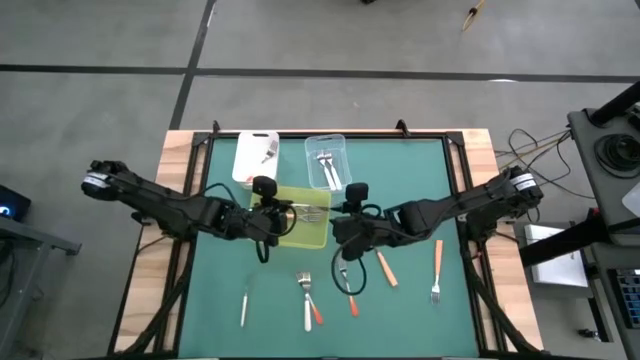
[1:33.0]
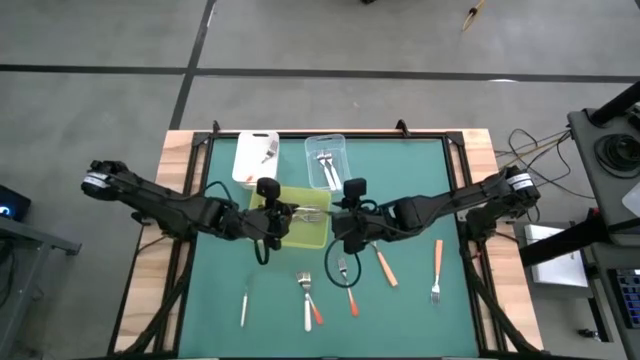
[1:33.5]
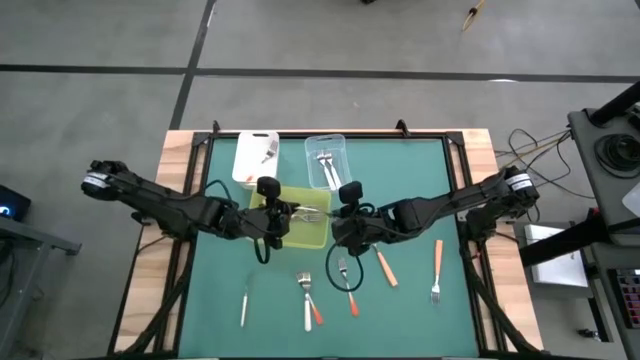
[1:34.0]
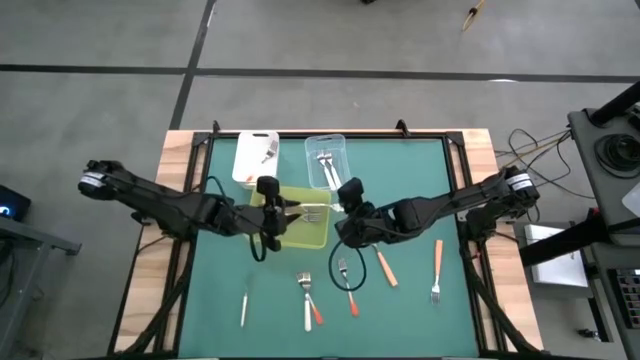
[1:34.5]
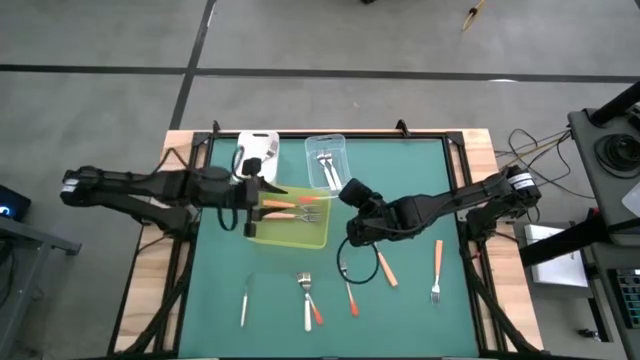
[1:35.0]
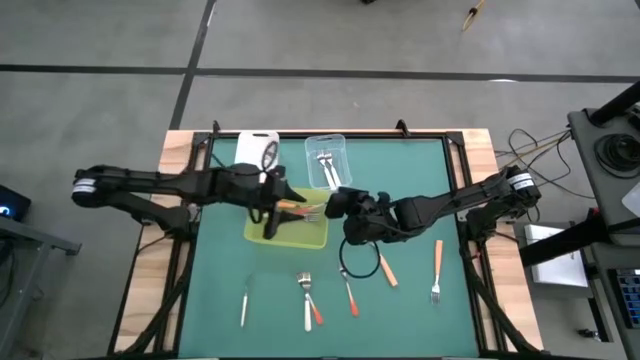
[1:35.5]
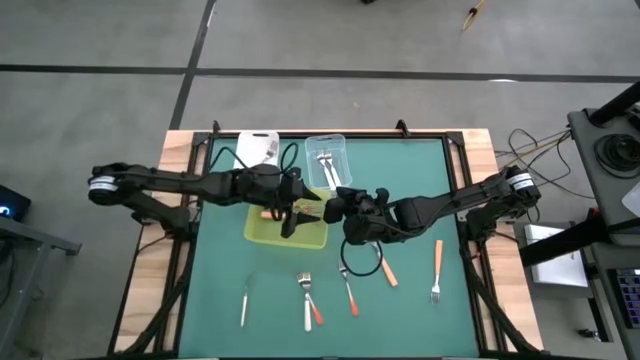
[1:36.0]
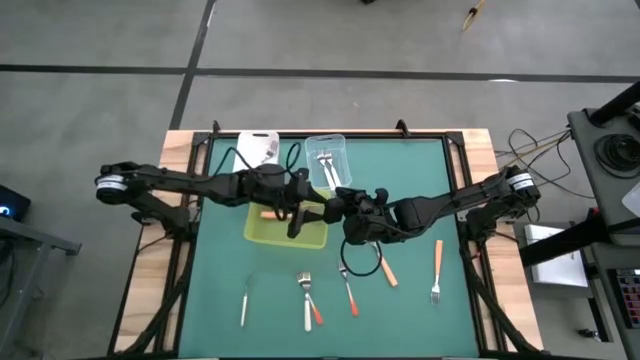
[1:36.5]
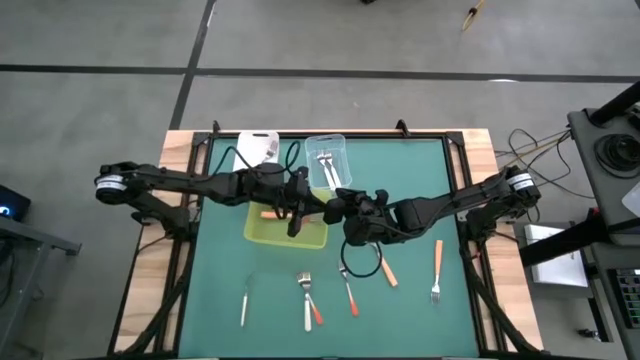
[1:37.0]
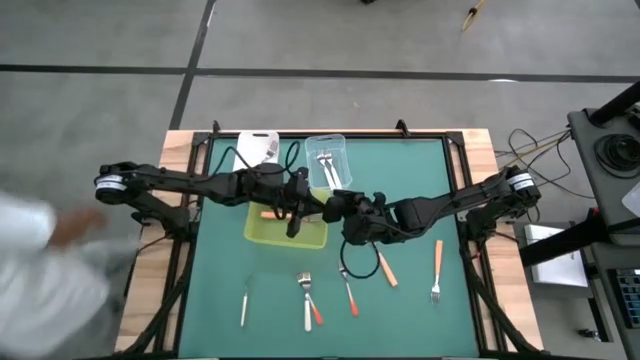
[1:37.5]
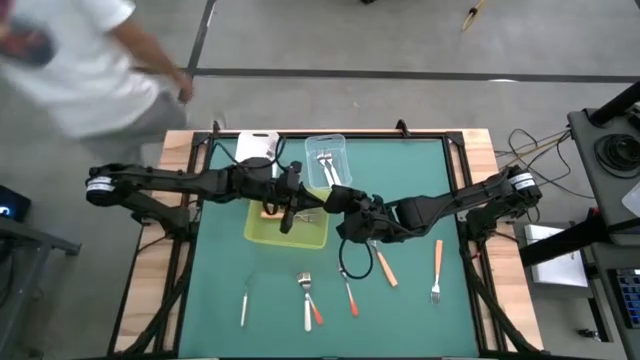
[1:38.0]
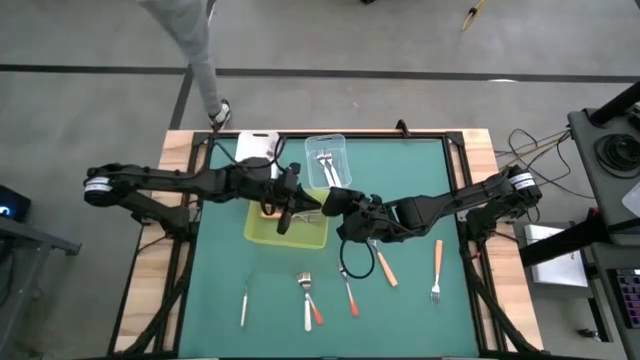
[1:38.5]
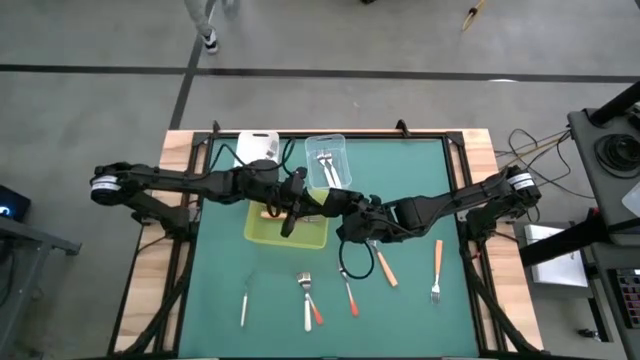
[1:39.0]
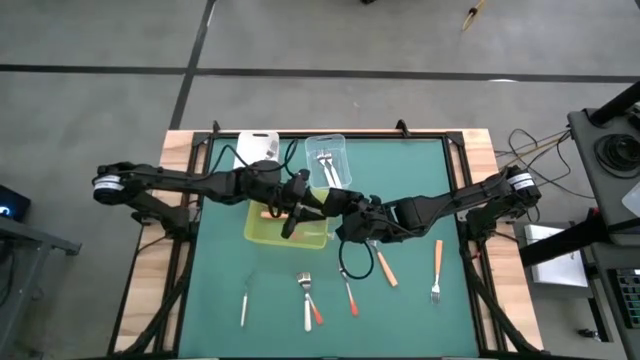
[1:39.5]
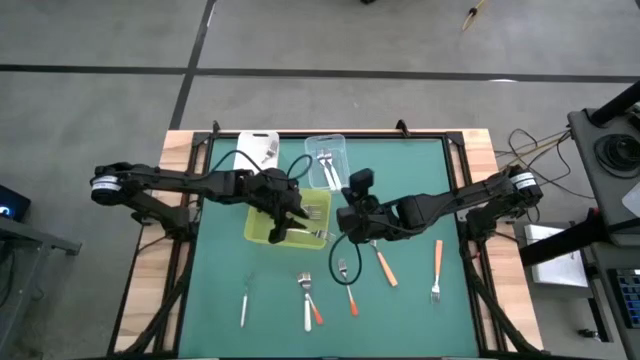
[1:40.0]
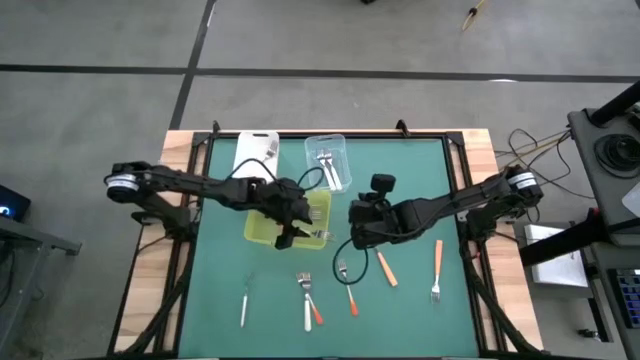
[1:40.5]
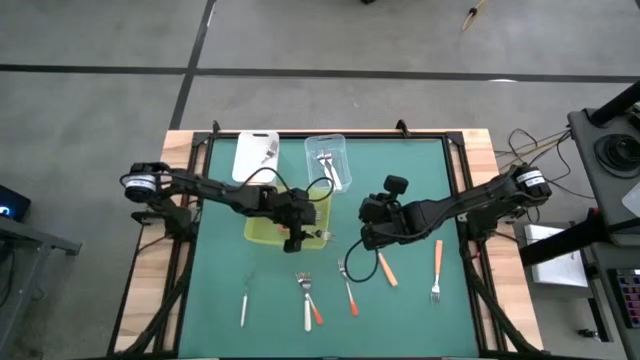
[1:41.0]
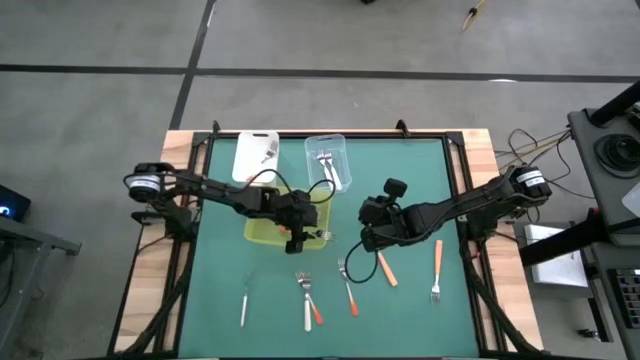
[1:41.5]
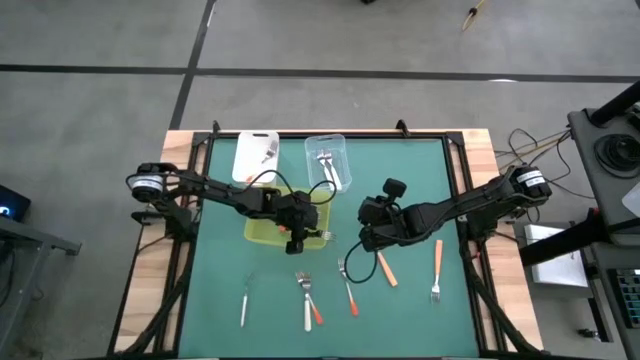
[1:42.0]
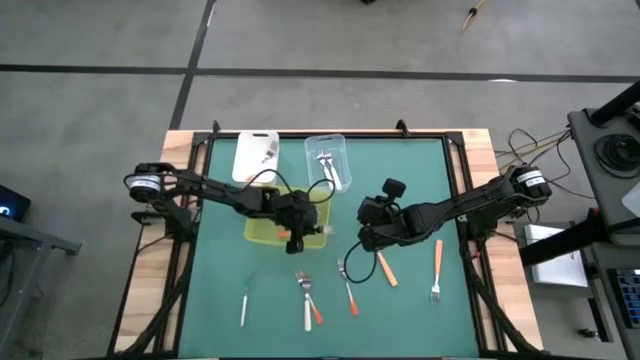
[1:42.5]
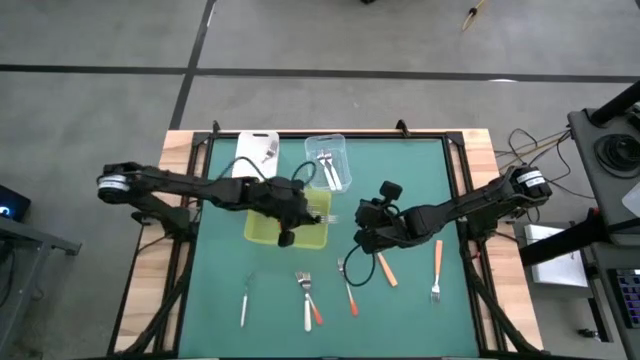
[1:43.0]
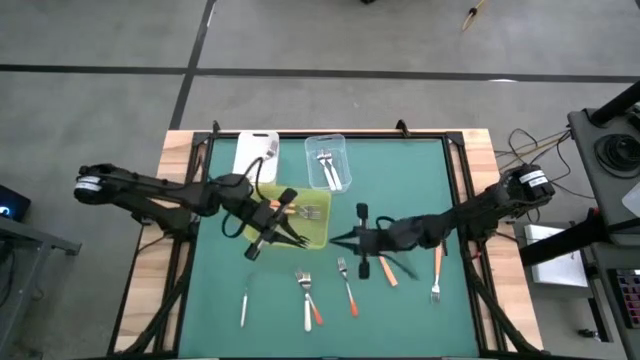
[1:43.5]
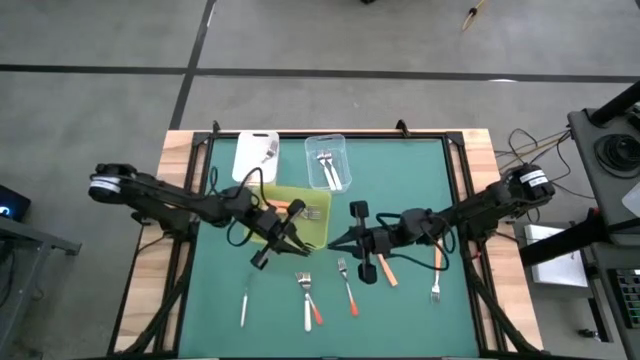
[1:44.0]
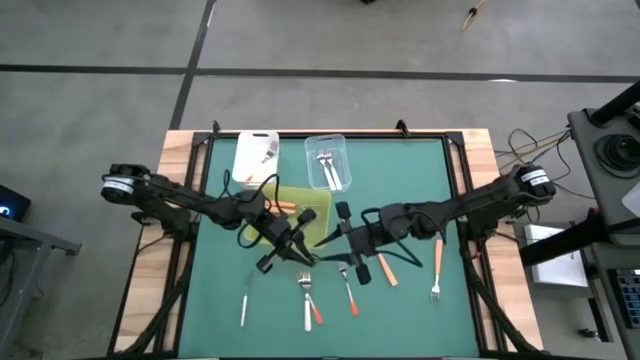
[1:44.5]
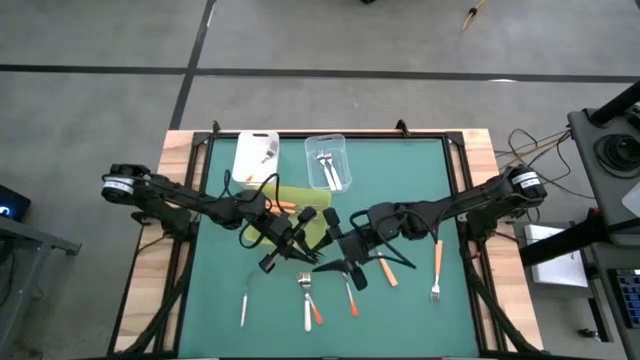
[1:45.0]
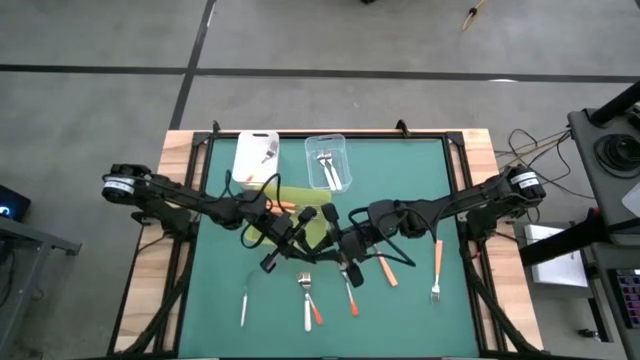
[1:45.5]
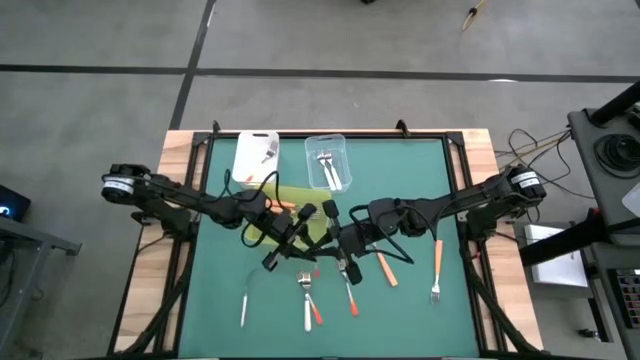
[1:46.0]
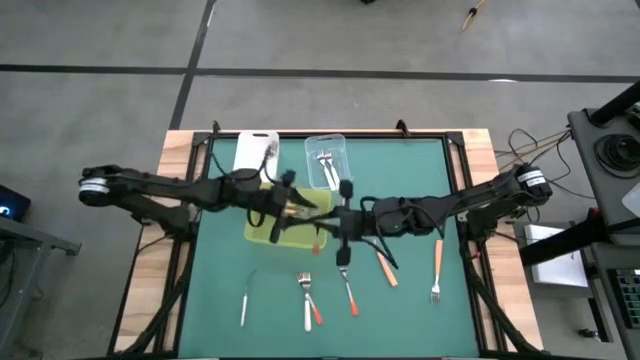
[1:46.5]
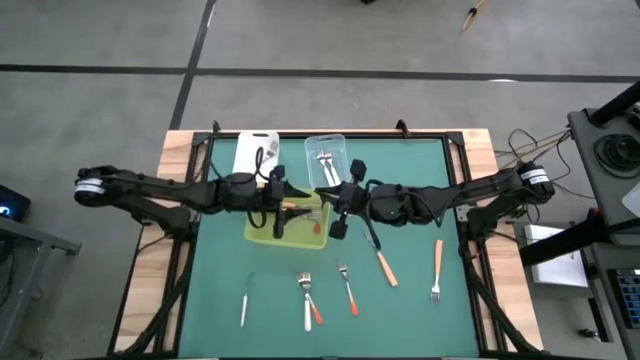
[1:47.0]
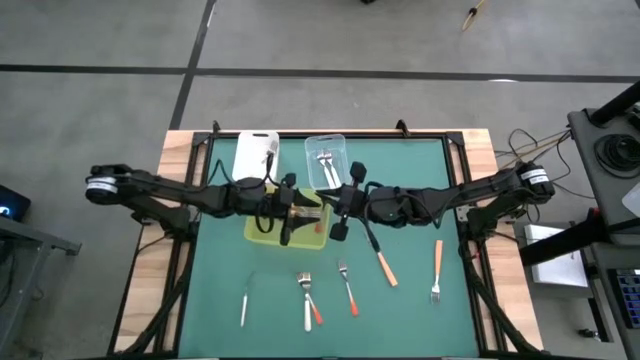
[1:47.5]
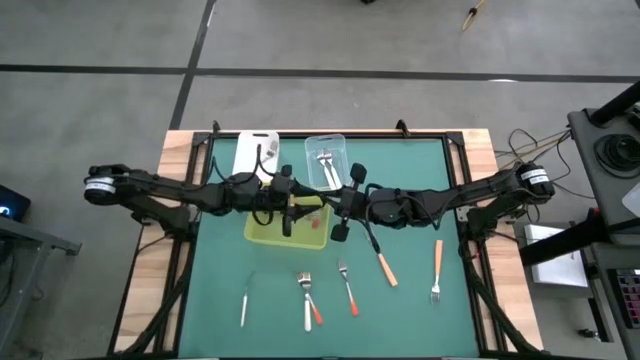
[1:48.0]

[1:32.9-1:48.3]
Task: Sort silverware by color (type)
Put the orange fork into the white bin

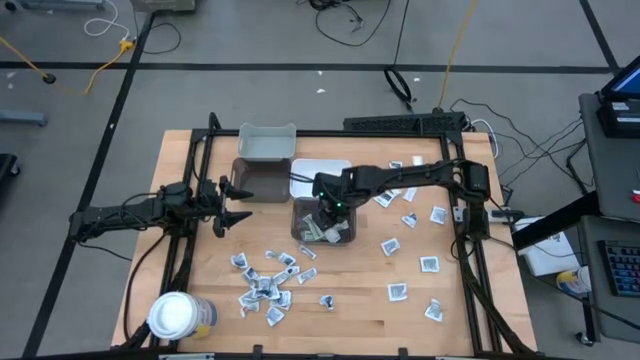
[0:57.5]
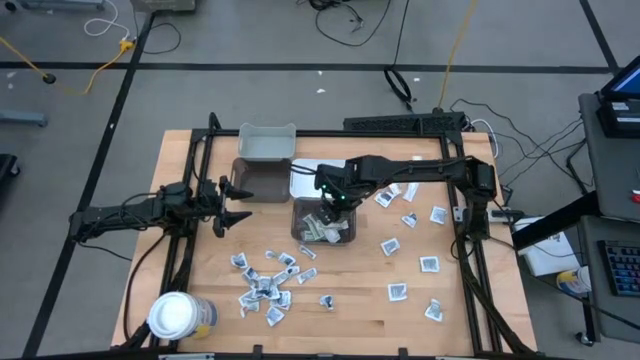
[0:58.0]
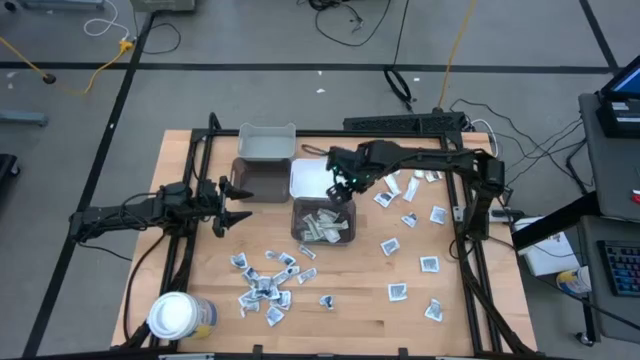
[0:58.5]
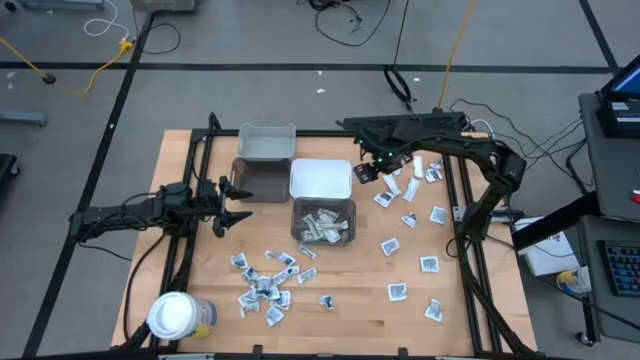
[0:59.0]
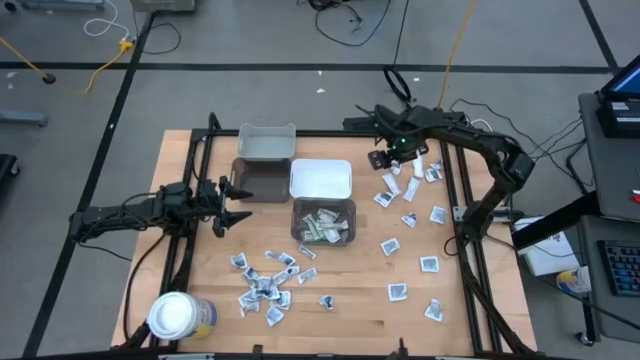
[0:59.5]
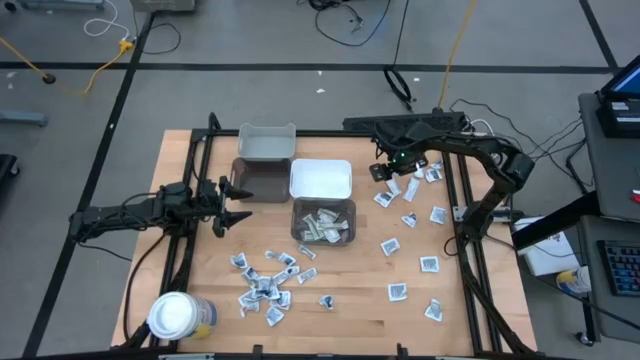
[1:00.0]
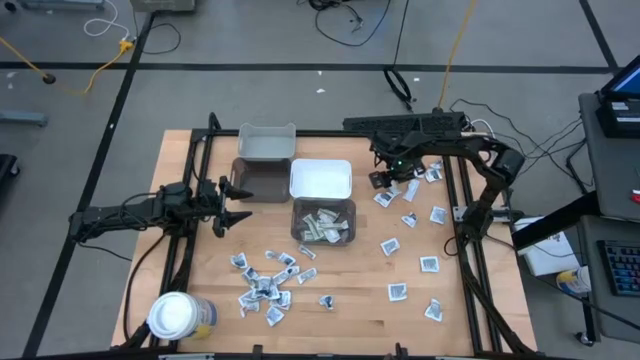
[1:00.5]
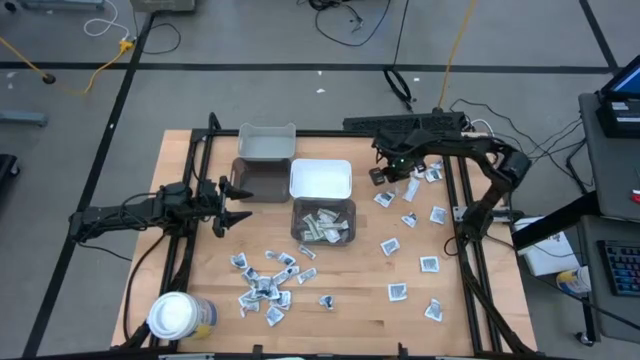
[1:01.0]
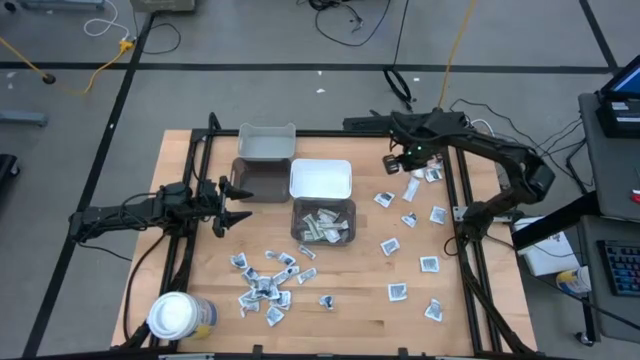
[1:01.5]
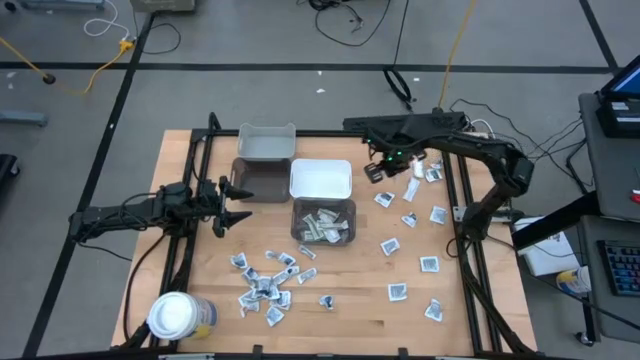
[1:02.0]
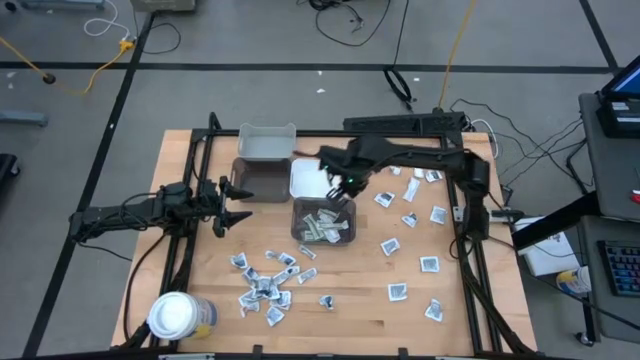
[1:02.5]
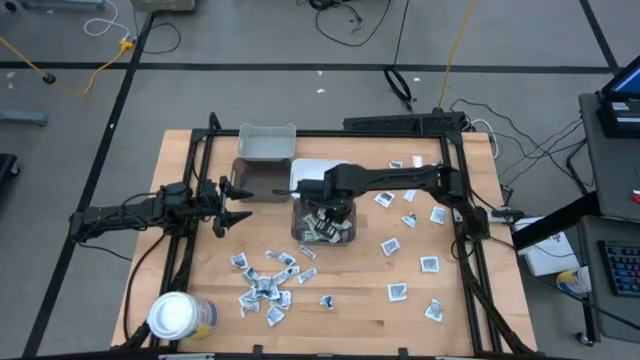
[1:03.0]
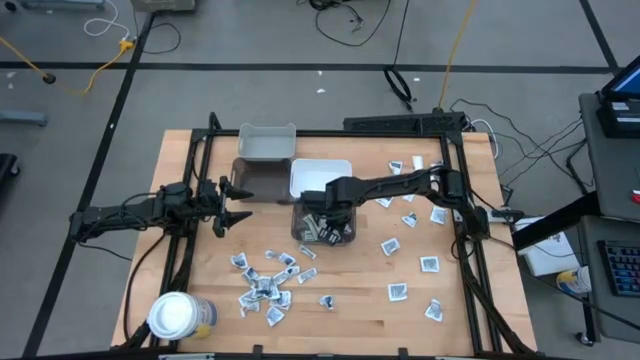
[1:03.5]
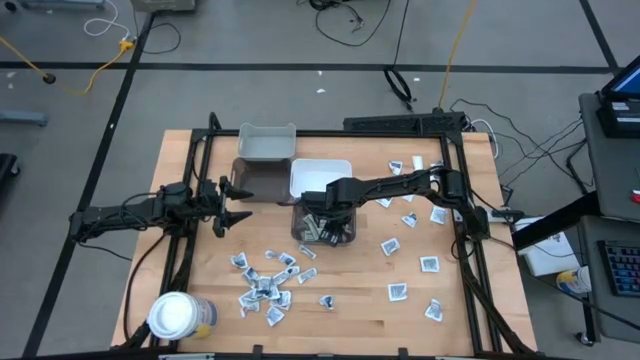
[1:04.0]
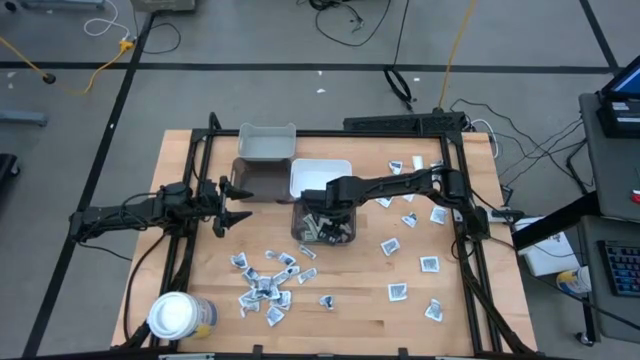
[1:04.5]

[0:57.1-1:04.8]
Task: Pick & Place First Aid Supplies
Put the green bandage pack into the right black bin
